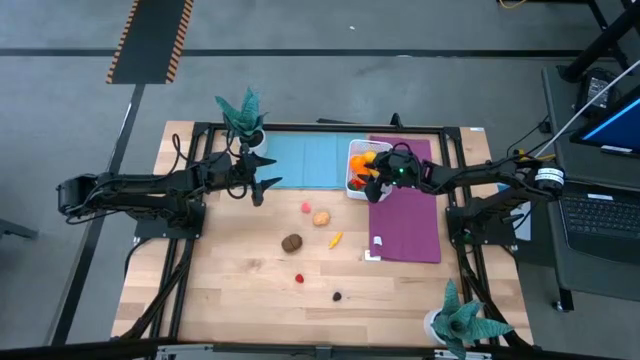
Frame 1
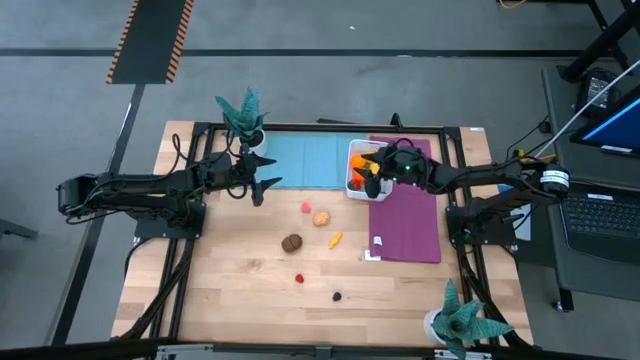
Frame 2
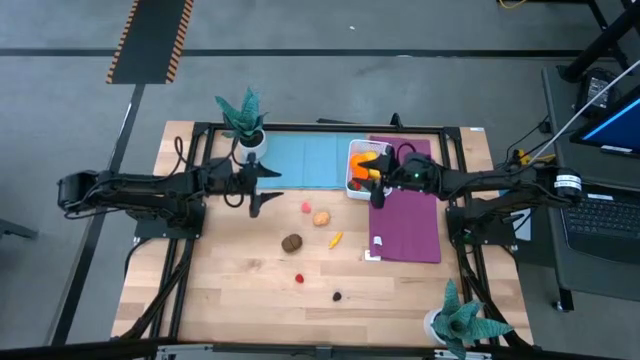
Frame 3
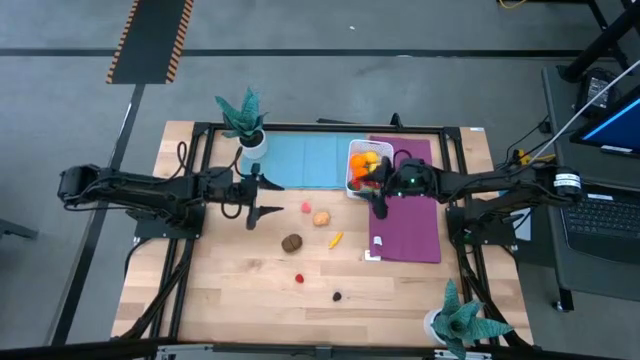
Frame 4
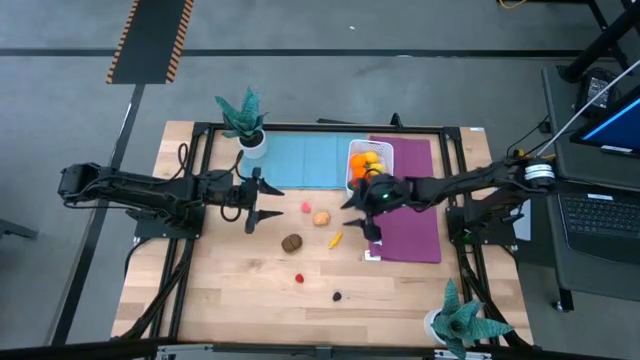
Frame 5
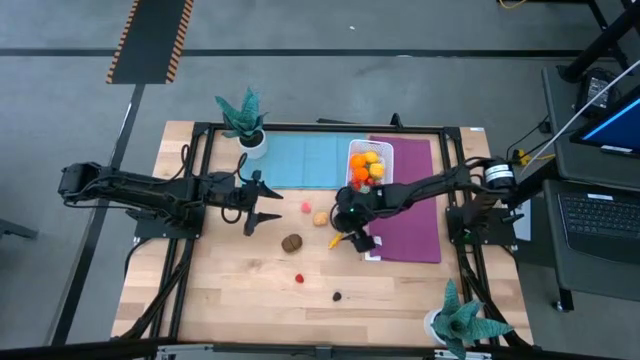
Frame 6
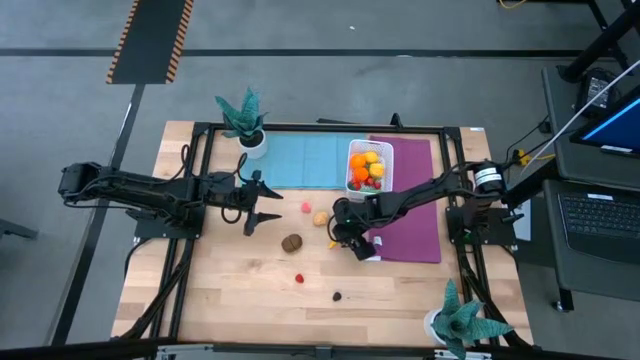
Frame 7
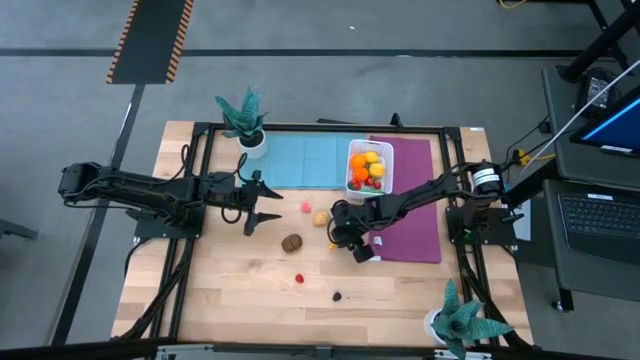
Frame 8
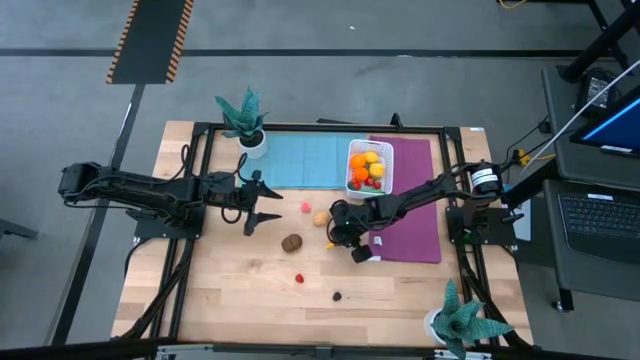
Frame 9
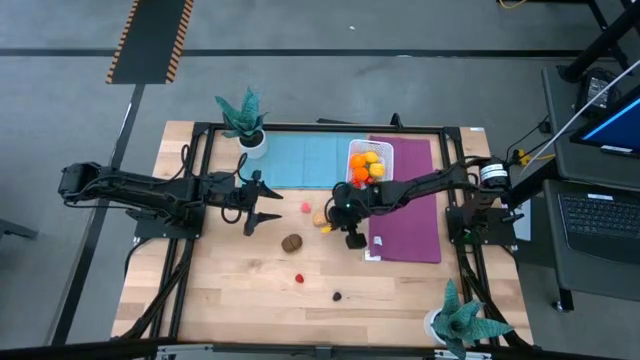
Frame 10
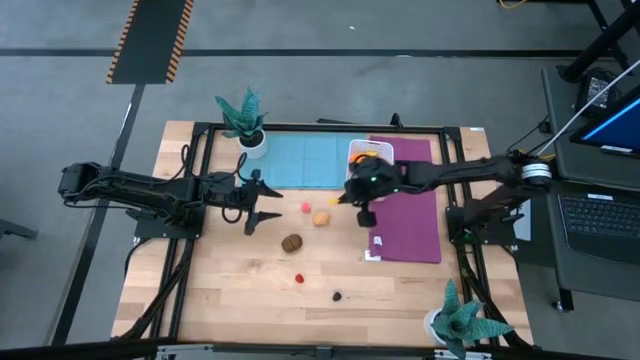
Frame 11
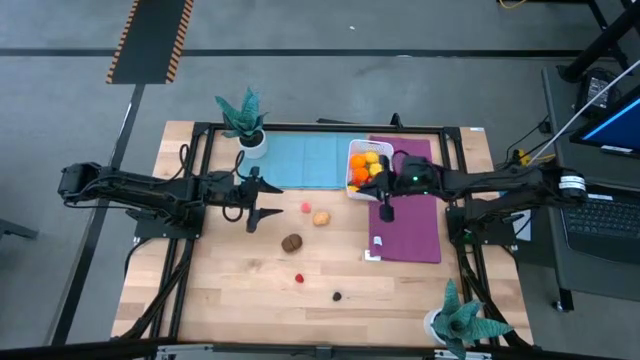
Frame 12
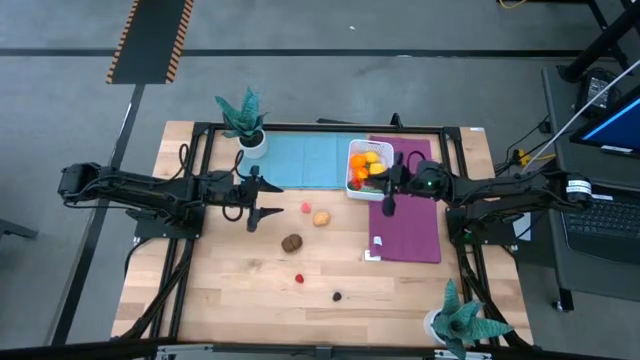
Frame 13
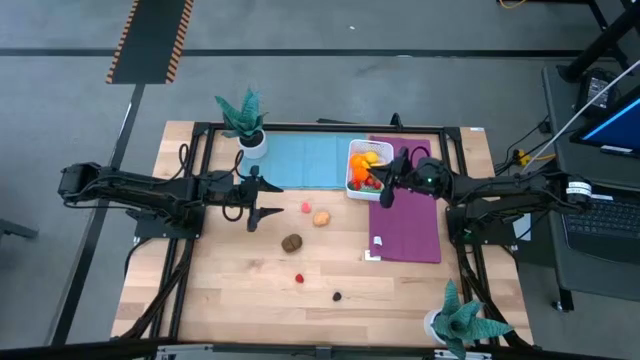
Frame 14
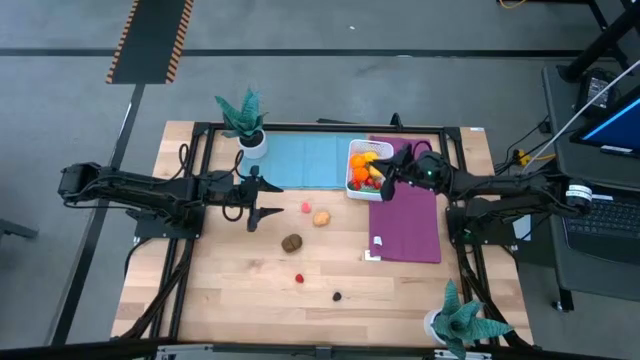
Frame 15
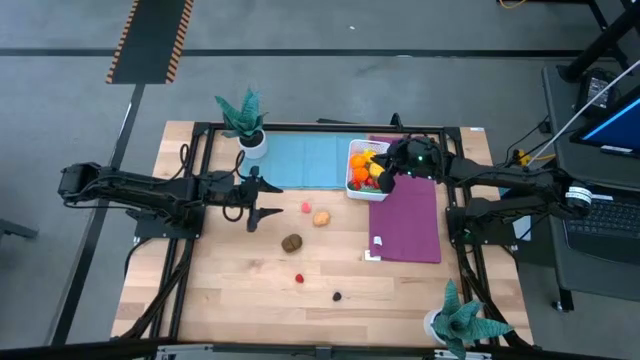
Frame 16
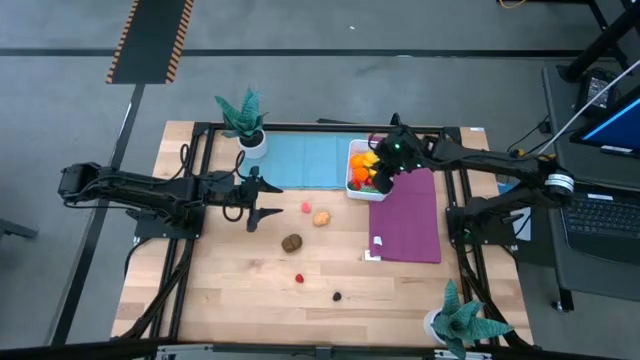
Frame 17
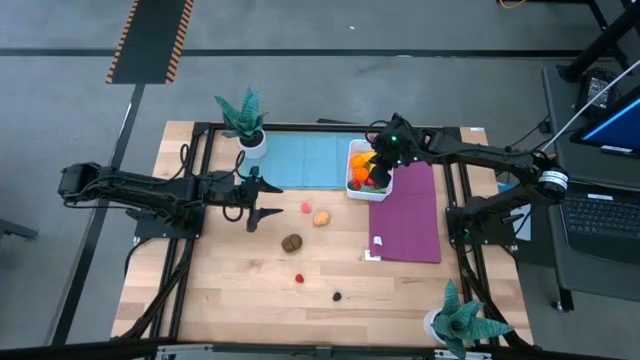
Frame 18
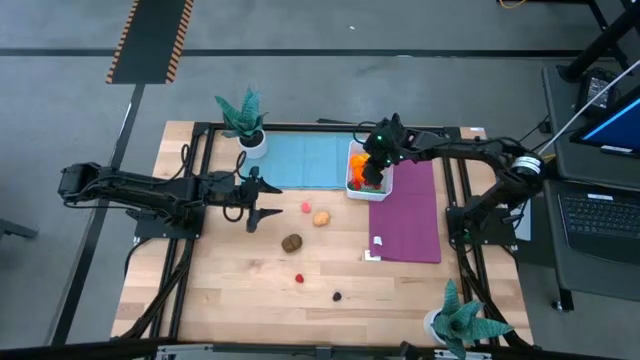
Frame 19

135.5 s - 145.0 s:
Task: Pick and placing Produce into tupperware
Put the yellow corn into the white container

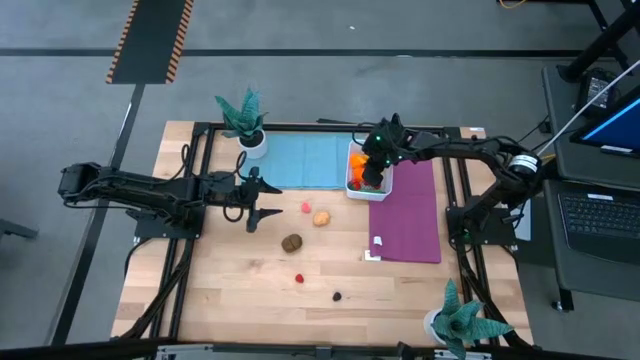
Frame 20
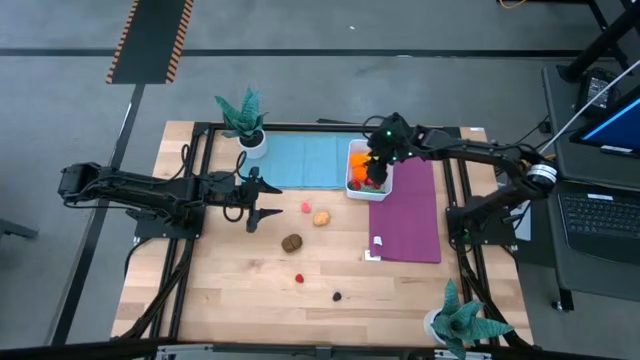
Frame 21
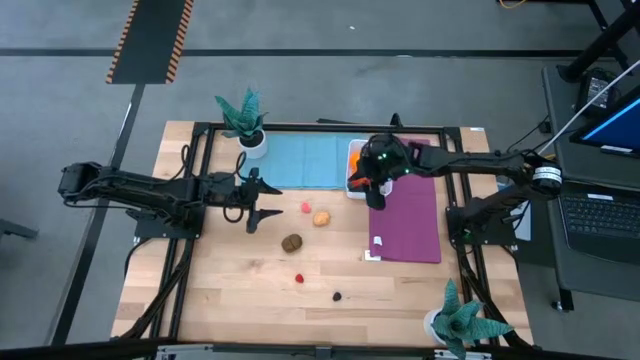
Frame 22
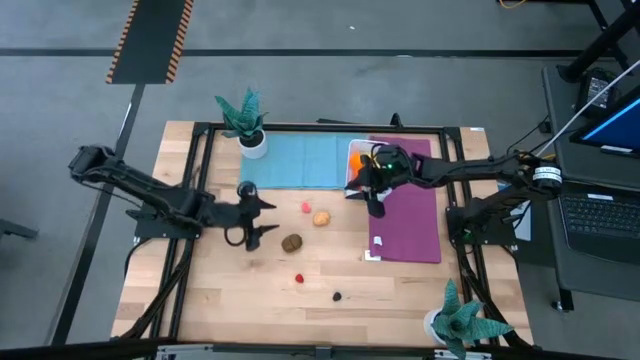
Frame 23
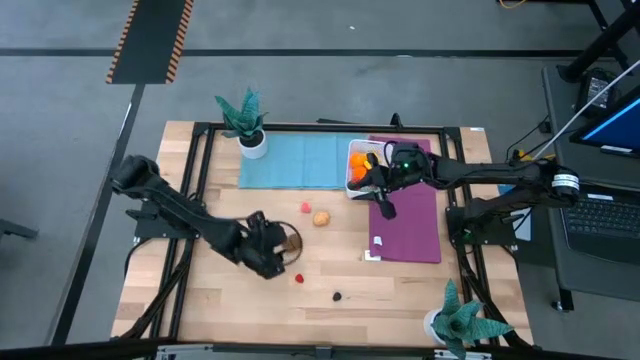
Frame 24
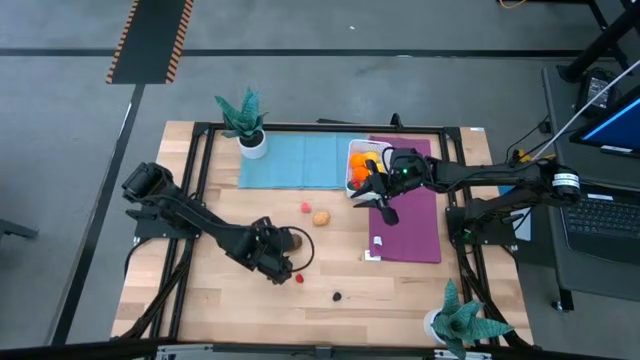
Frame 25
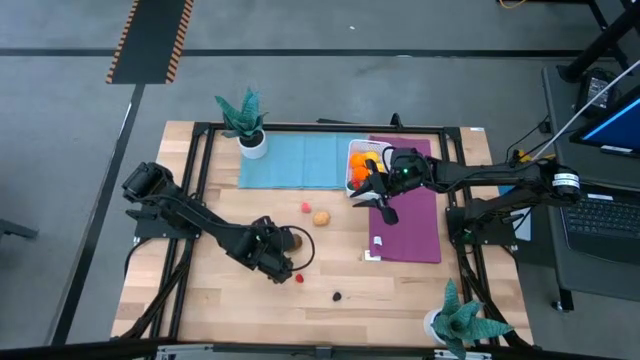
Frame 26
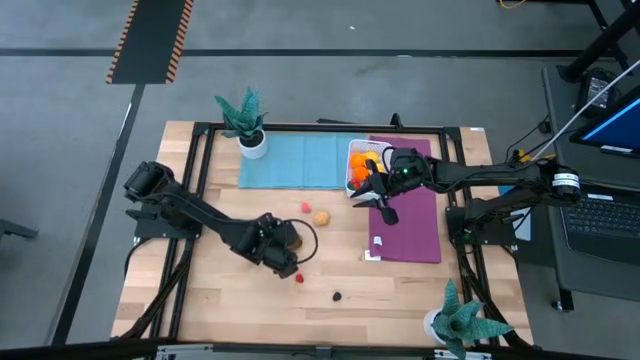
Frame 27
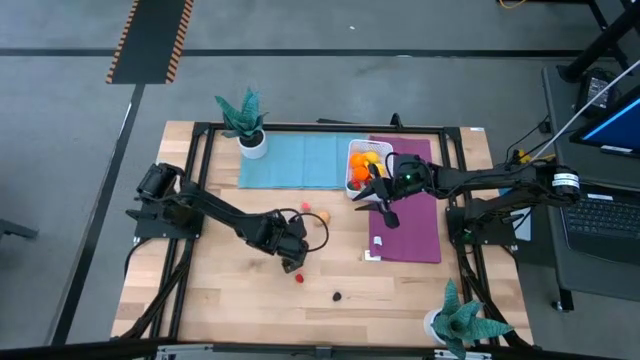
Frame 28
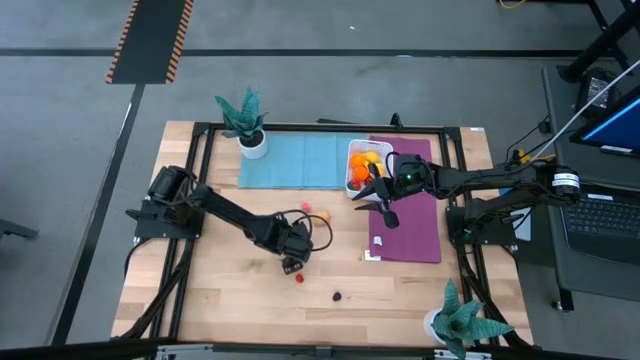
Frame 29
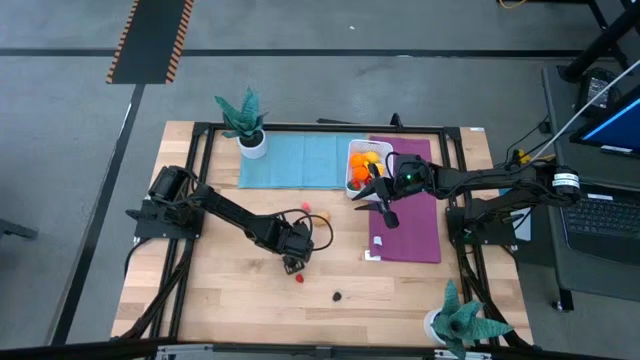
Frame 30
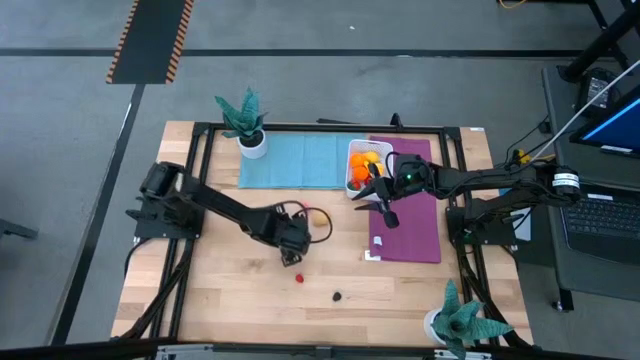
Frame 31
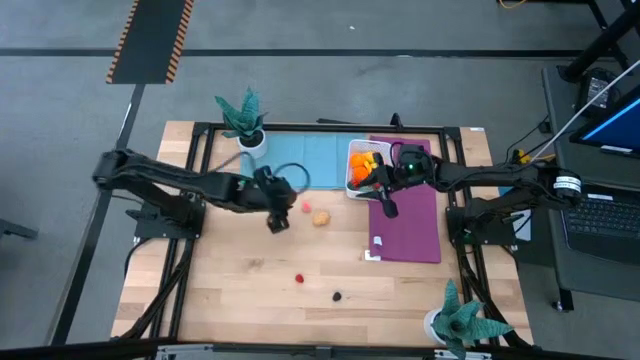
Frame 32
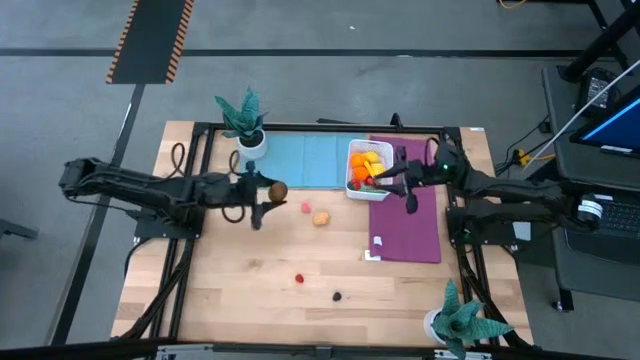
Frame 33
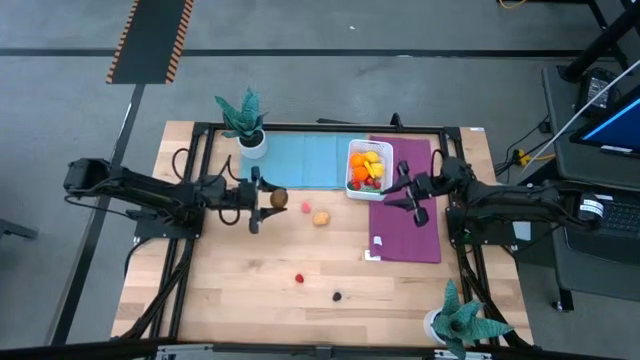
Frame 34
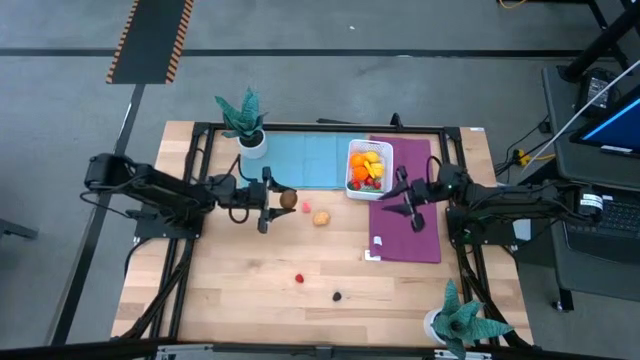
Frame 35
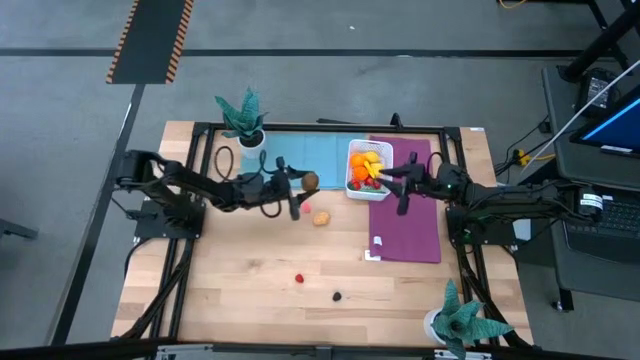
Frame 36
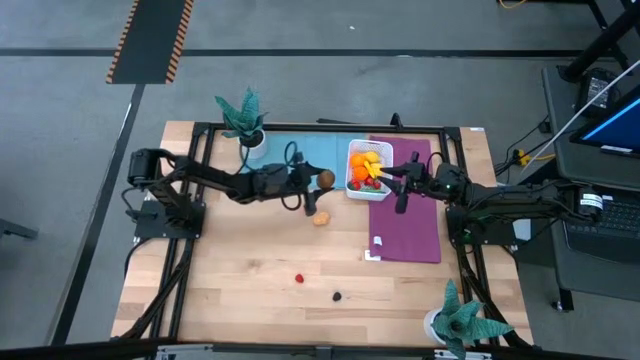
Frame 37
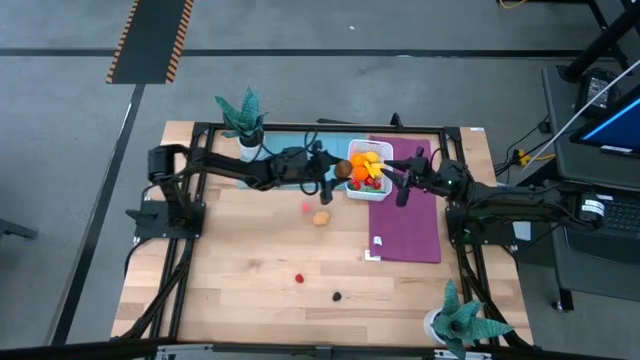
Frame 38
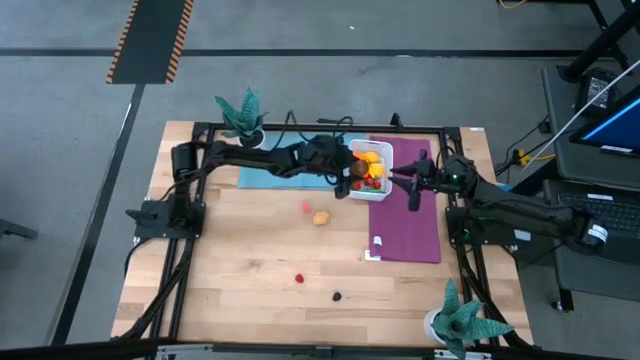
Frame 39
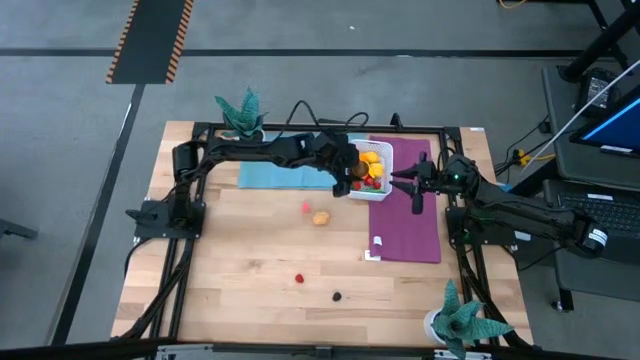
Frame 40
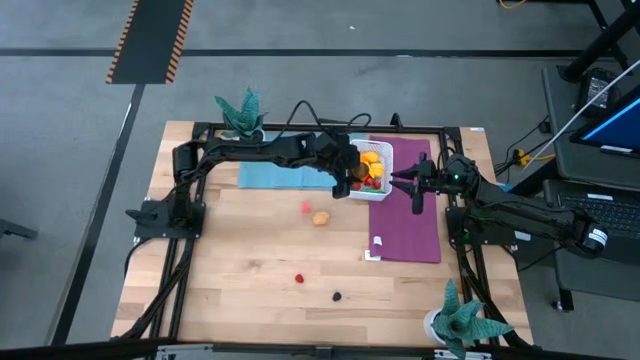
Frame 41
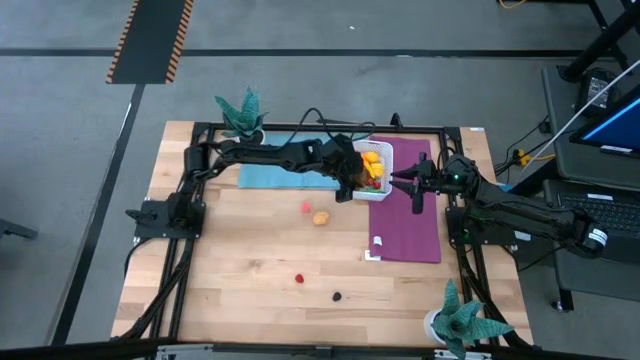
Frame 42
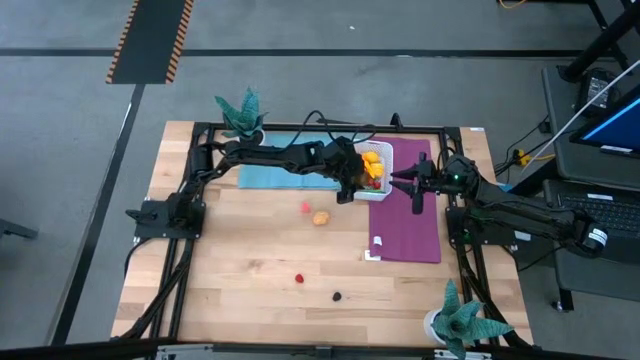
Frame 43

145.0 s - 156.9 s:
Put the brown kiwi into the white container

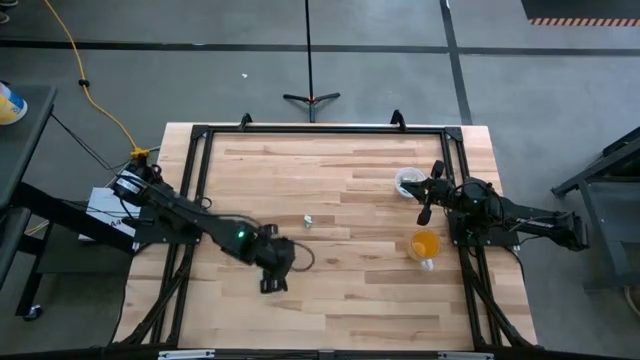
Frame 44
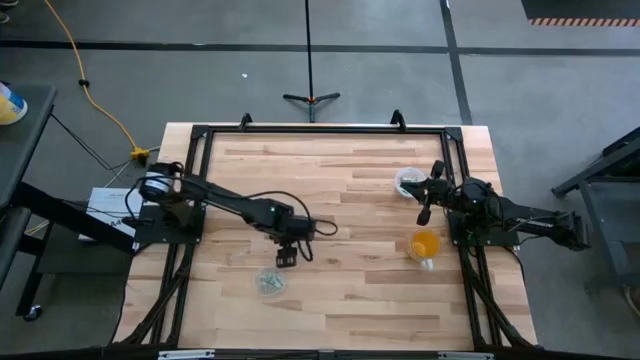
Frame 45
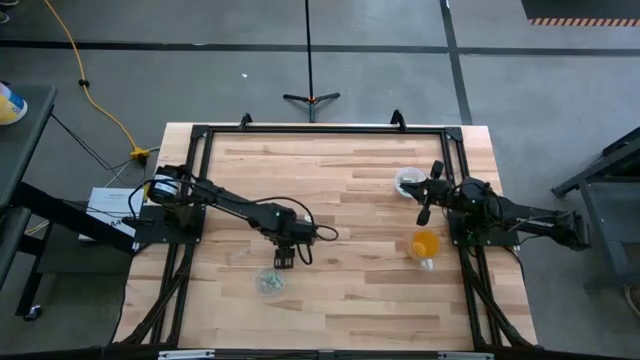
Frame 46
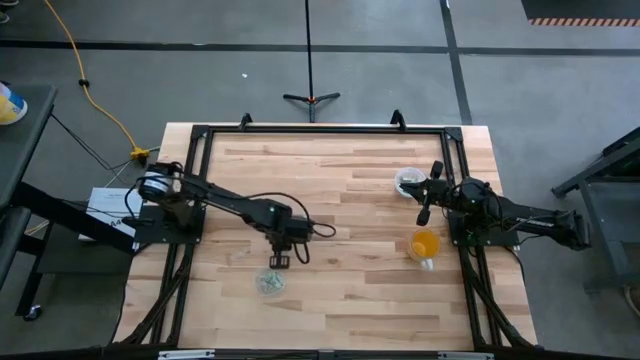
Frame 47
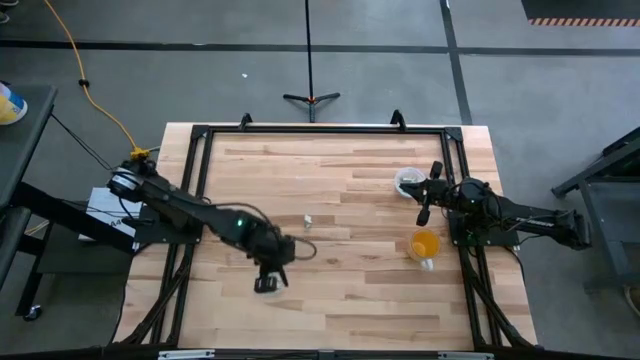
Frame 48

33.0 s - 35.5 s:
Task: Pick and place Stevia / Truvia into bins
Put the bottom stevia packet into the square container
